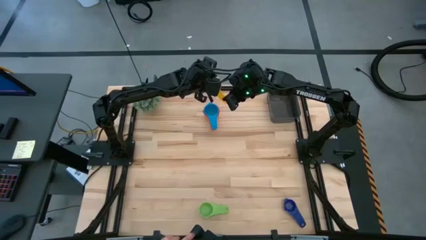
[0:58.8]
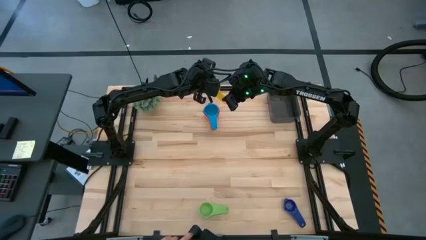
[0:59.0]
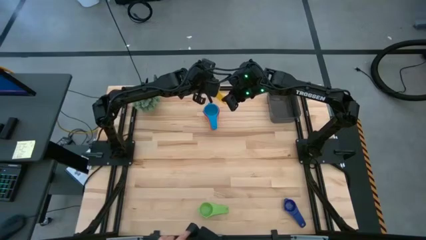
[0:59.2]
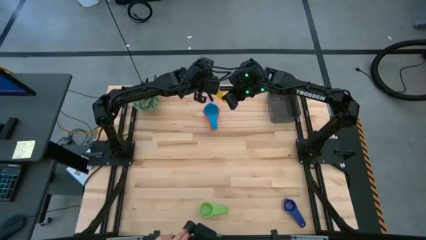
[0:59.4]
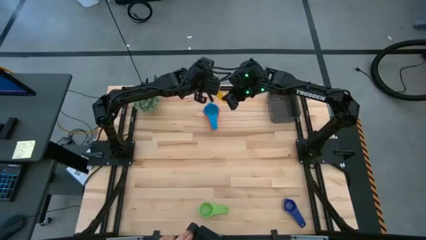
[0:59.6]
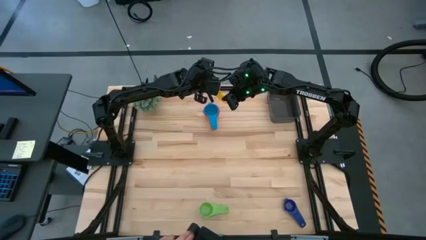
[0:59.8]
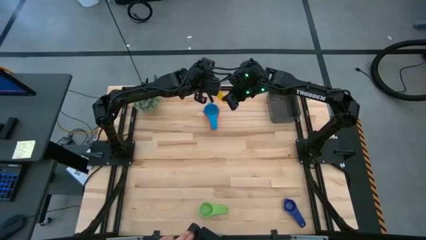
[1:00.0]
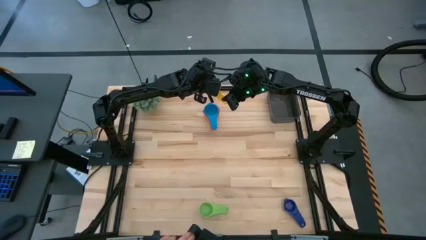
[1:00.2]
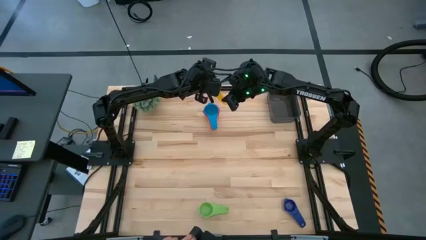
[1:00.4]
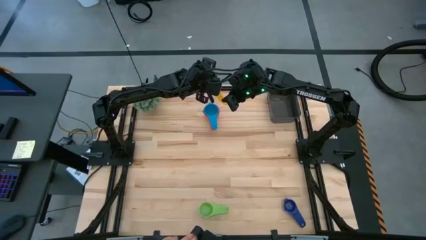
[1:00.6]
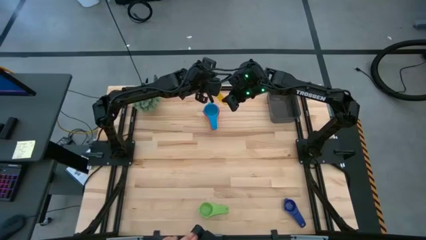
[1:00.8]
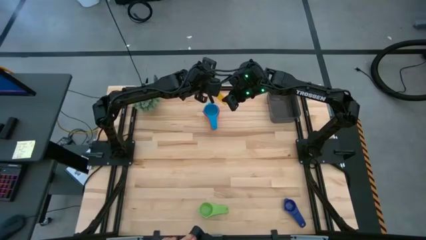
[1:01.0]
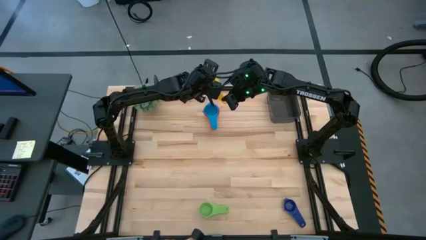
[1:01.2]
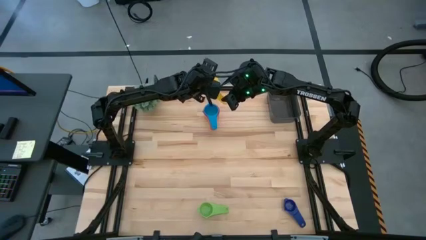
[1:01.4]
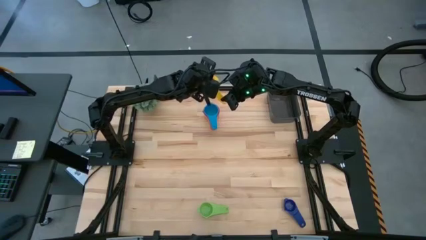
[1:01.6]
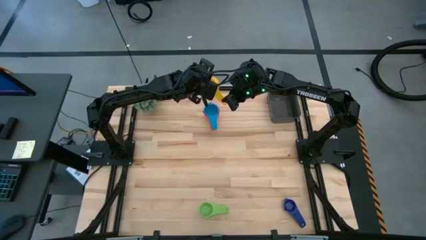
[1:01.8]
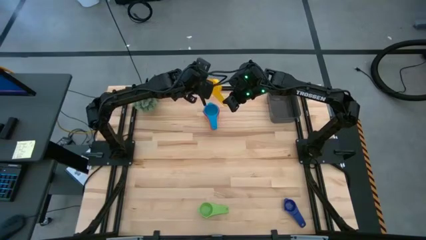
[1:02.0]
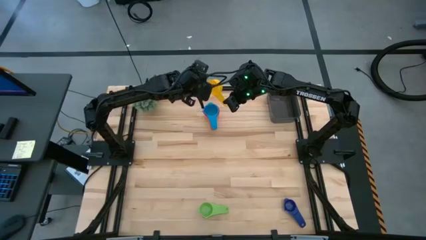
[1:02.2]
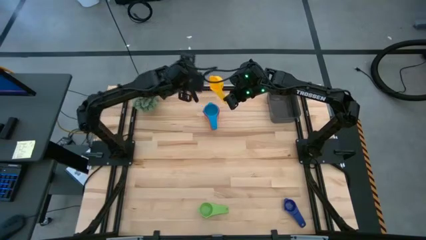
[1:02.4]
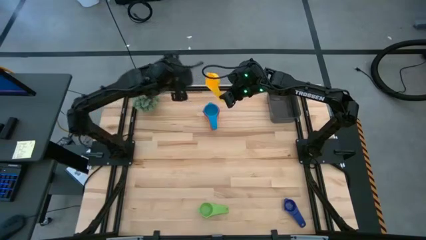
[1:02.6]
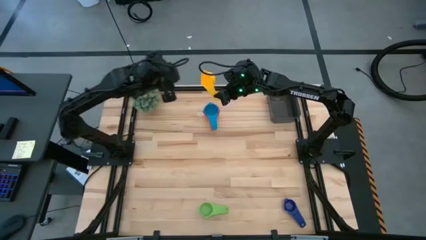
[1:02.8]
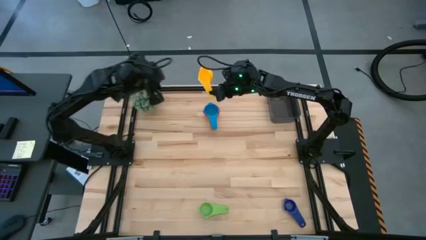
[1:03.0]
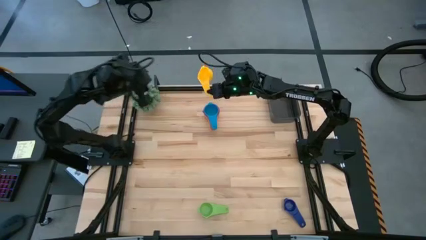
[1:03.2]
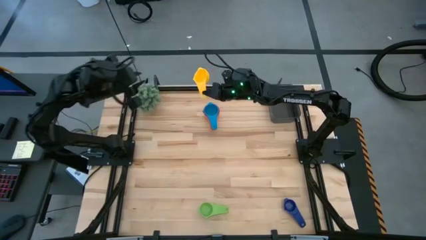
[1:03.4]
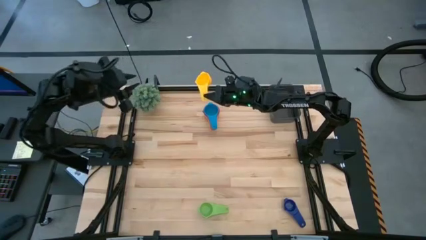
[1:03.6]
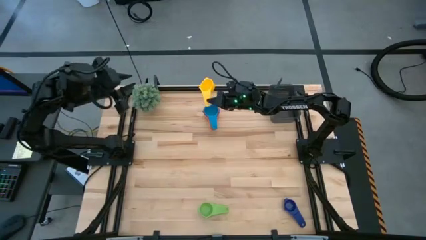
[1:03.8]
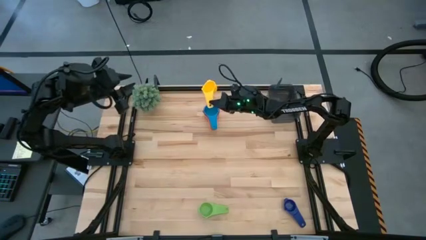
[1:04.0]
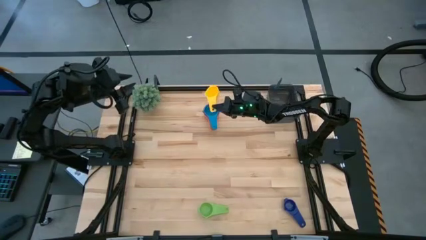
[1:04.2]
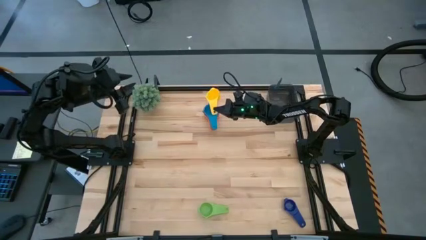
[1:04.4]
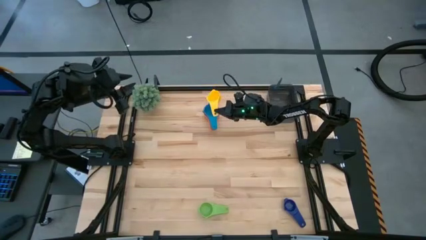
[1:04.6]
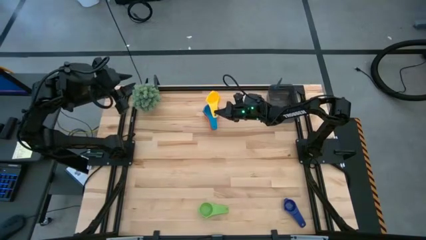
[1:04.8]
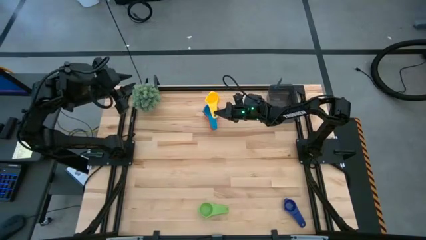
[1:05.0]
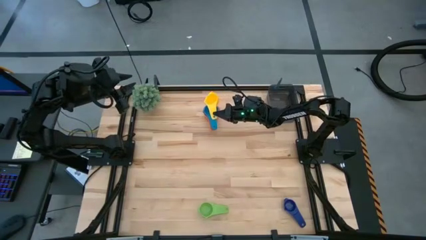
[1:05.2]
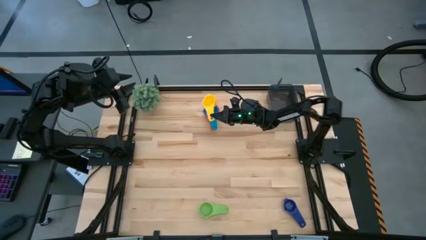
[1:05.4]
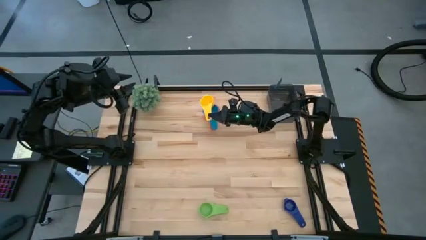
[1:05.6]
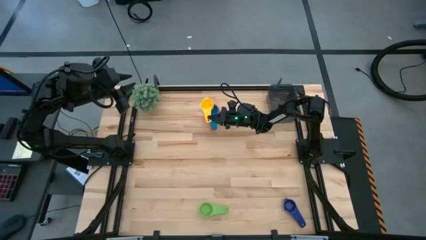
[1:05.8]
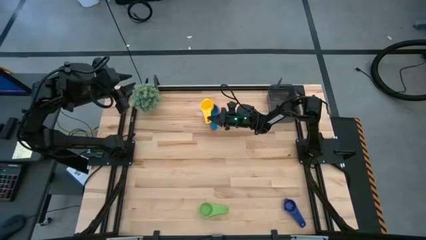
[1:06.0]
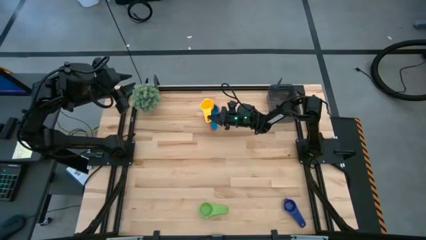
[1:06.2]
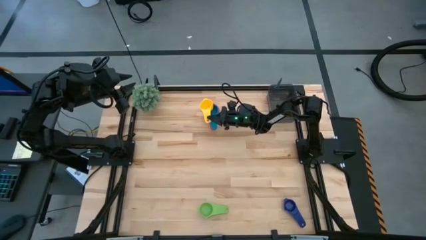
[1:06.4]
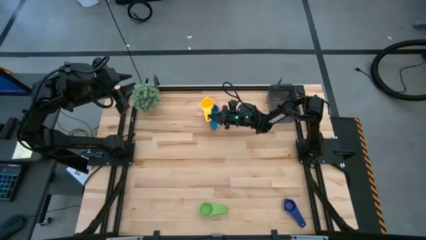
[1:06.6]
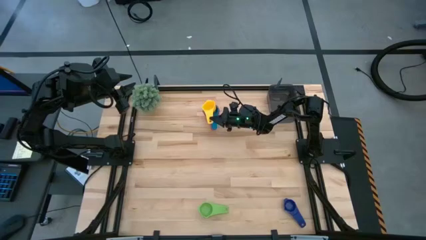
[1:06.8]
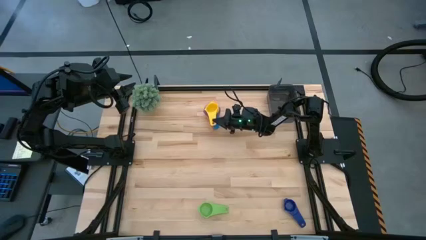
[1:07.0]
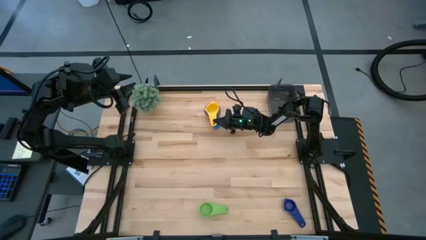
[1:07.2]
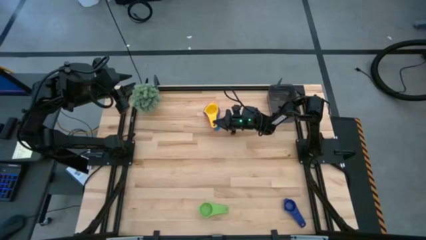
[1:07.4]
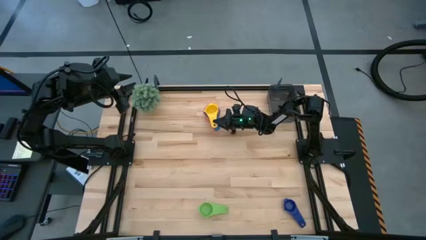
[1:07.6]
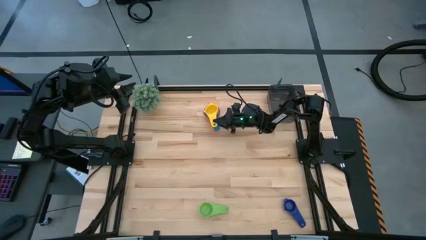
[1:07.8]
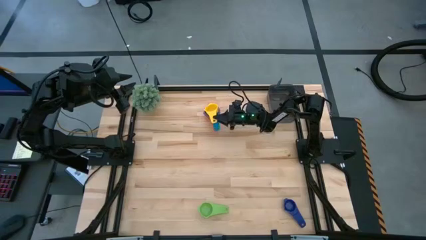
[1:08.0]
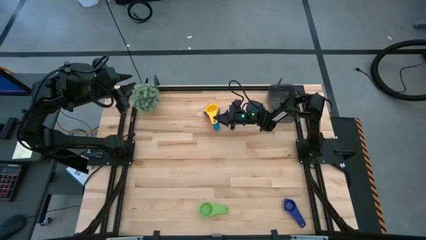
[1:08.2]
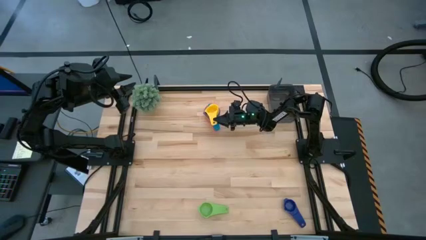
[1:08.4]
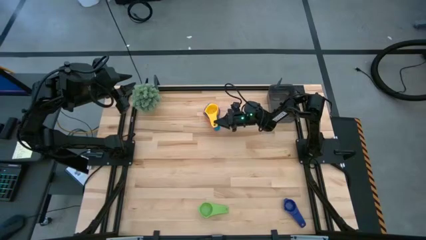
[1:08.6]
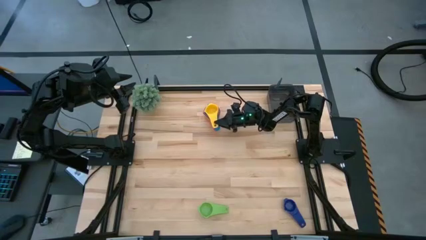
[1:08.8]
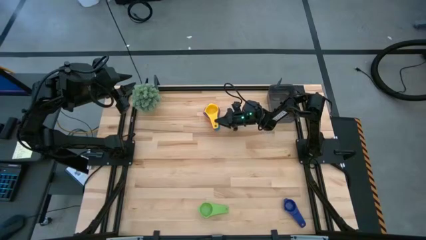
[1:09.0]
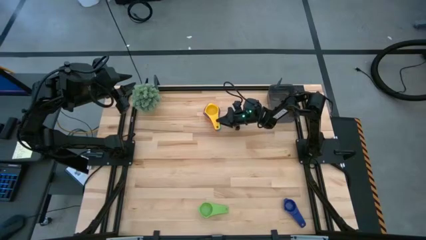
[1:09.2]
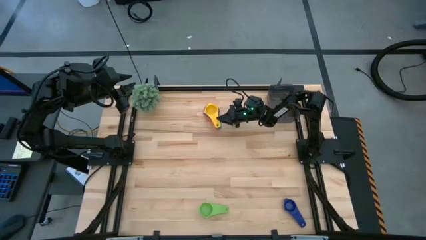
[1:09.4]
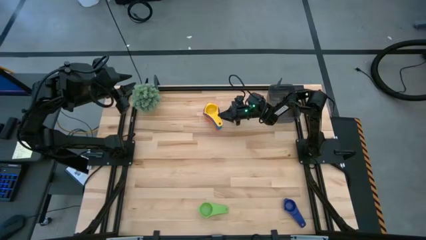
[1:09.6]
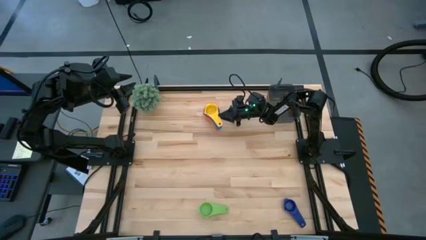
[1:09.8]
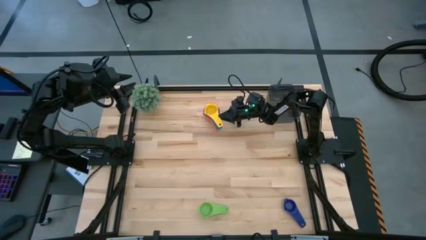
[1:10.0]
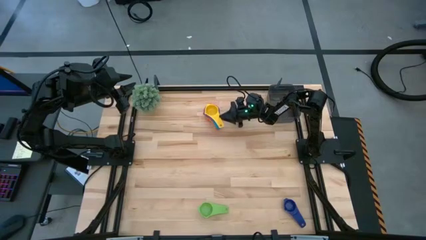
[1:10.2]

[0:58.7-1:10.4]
Task: Nest measuring cups in basket
Stack the yellow measuring cup on top of the light blue measuring cup

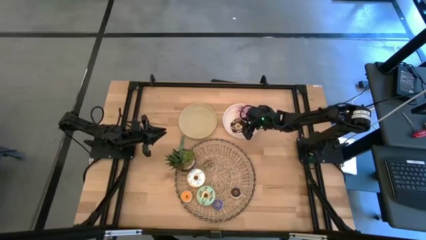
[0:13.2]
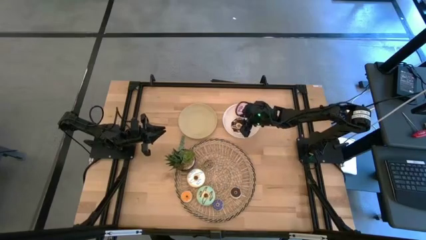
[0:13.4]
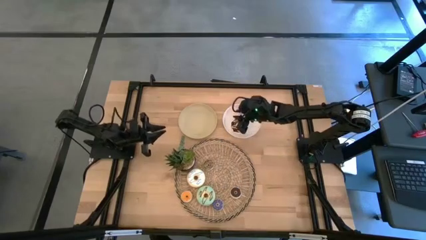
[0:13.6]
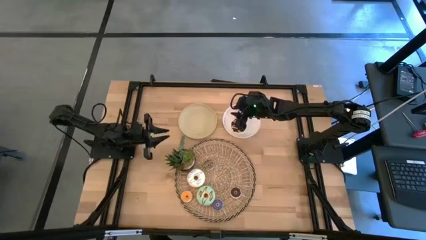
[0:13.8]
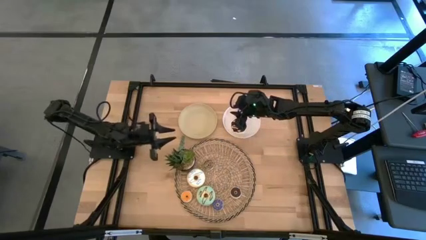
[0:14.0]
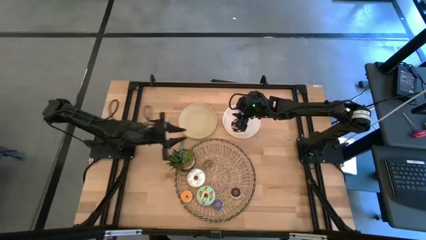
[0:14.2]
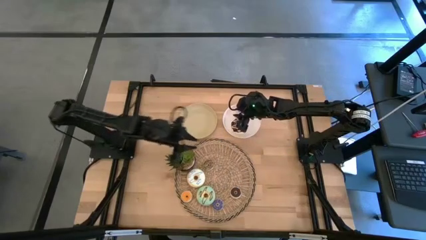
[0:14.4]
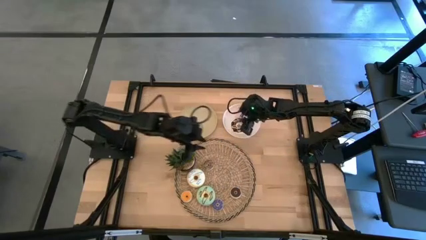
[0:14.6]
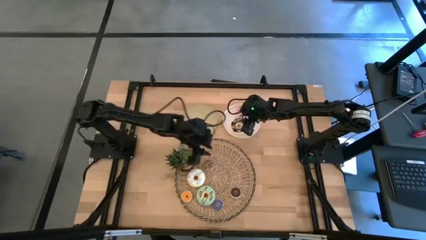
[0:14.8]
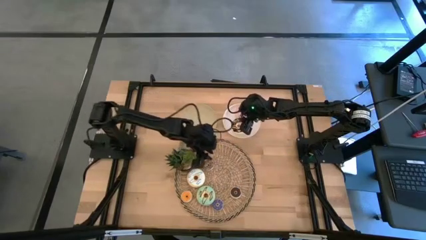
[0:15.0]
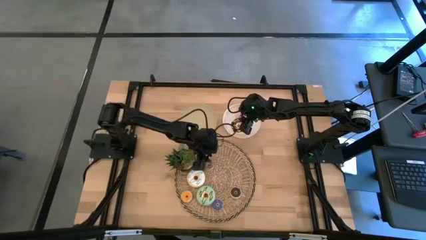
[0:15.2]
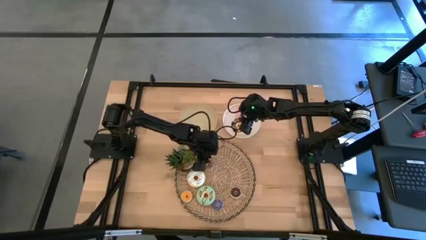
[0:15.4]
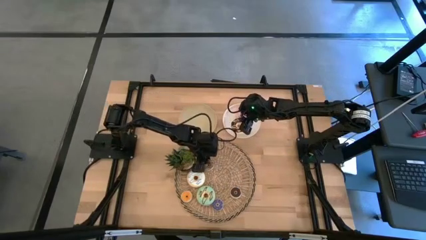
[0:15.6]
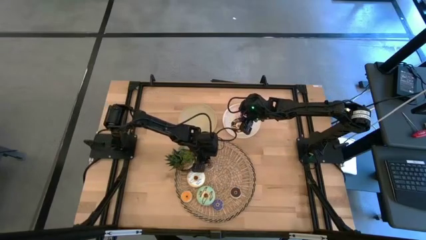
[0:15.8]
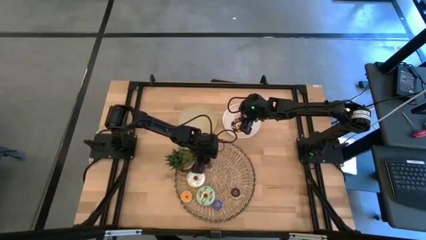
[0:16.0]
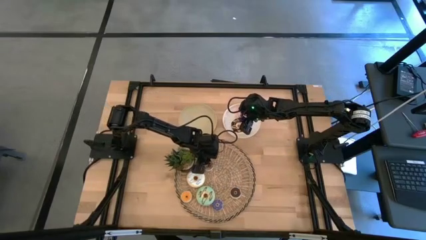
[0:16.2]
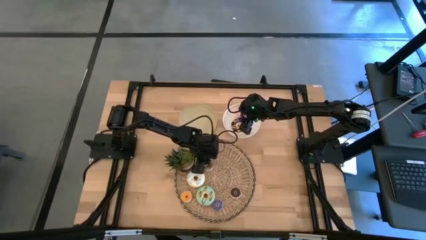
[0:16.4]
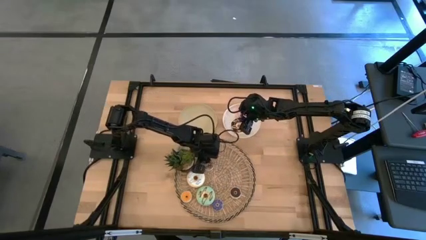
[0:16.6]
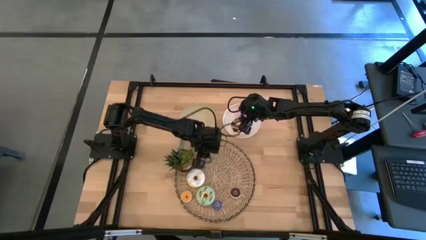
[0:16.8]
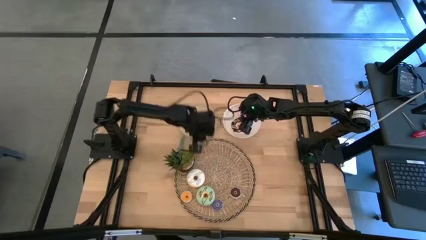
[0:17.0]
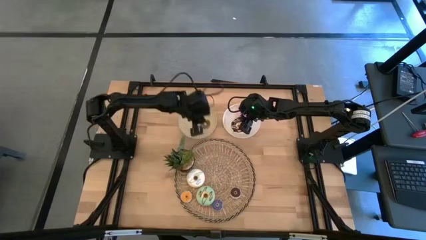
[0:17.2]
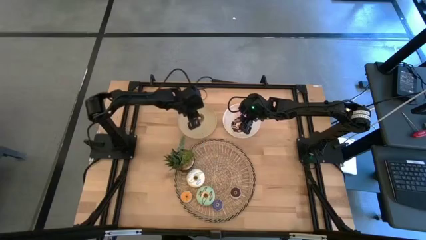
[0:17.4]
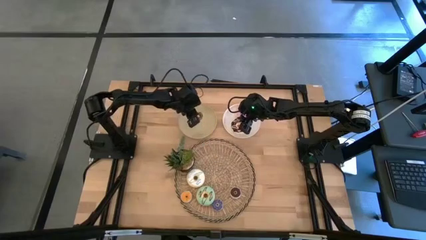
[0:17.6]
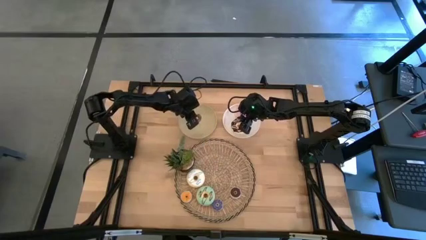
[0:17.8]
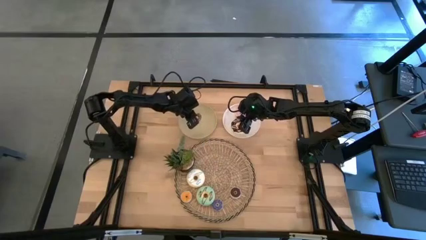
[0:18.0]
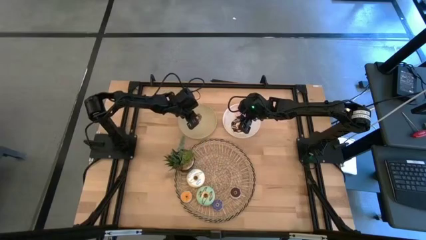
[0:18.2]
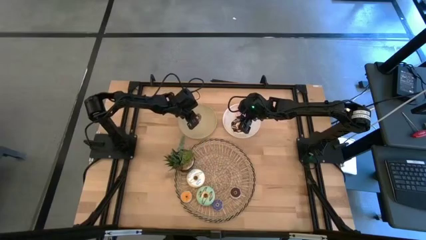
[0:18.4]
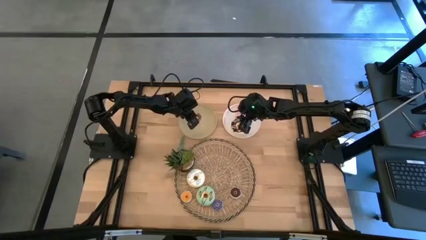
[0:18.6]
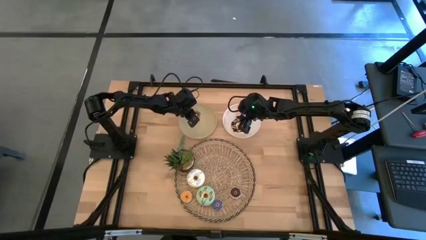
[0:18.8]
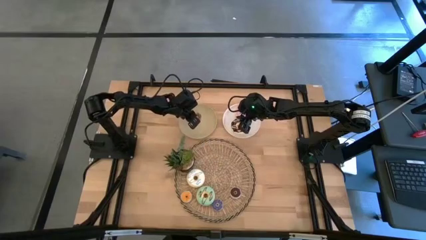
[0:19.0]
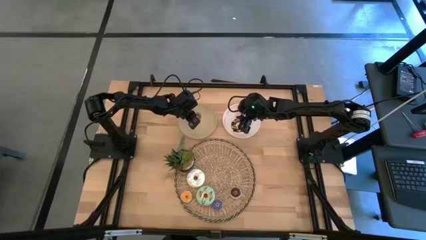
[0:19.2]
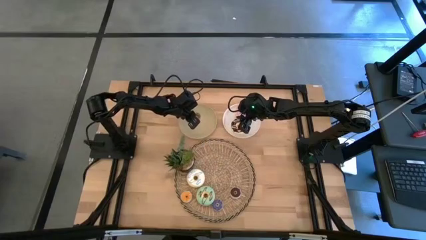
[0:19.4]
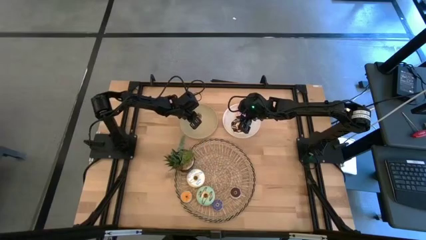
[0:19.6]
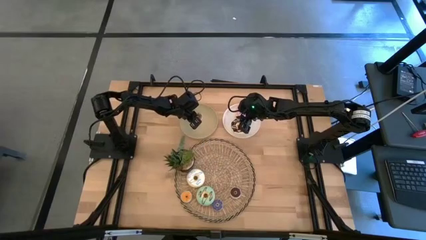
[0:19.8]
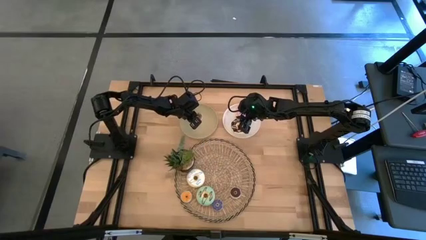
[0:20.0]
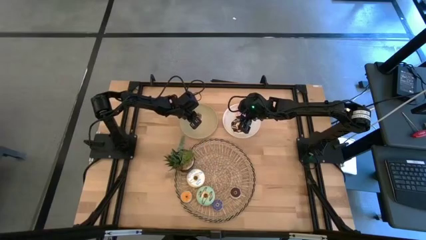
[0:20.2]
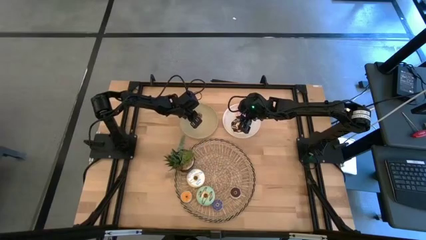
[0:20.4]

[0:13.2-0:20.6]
Task: Pick & Place donuts
Put the small brown donut on the brown plate
